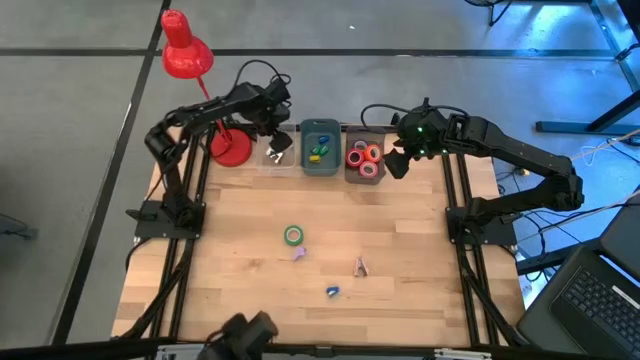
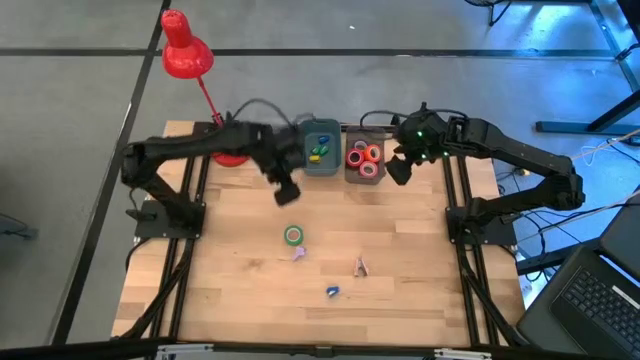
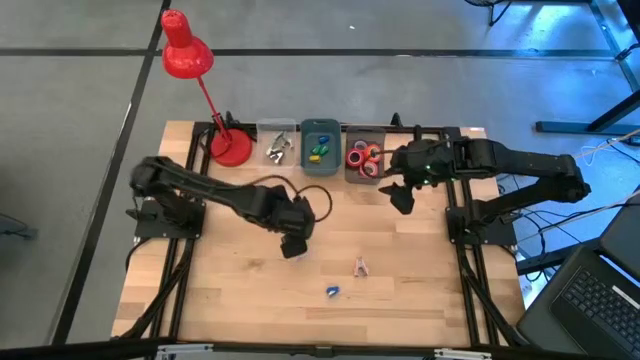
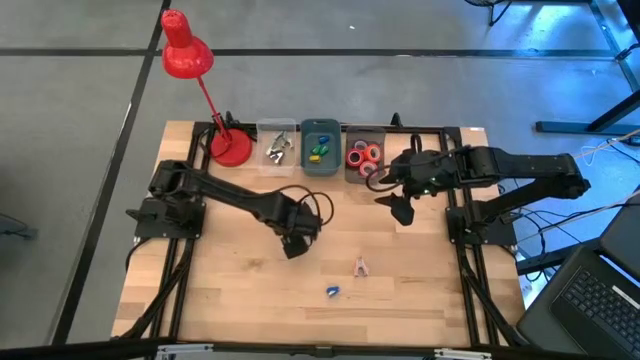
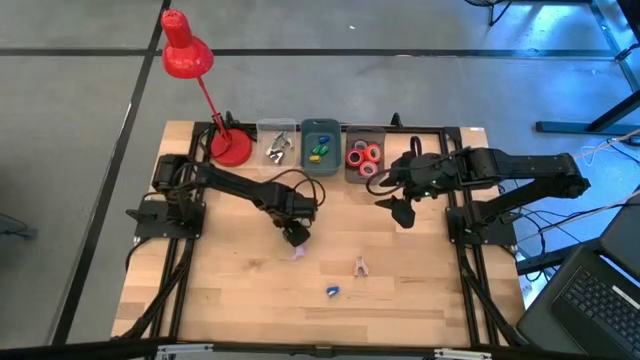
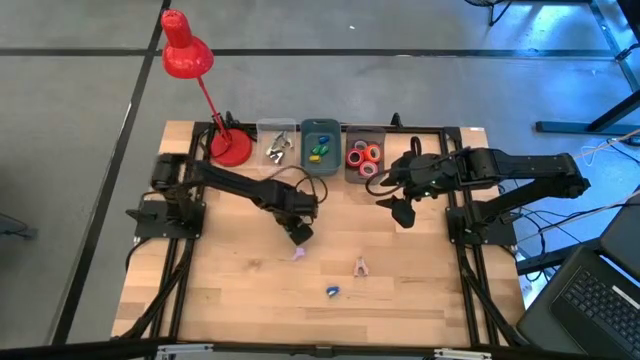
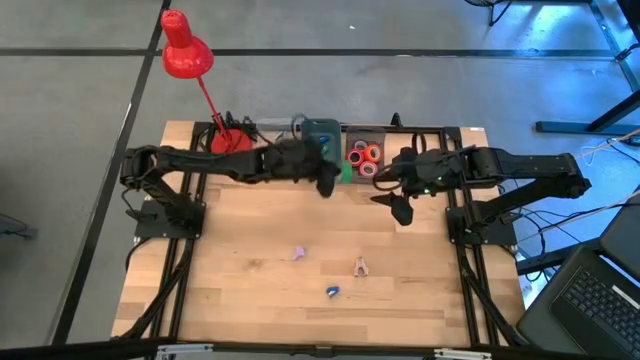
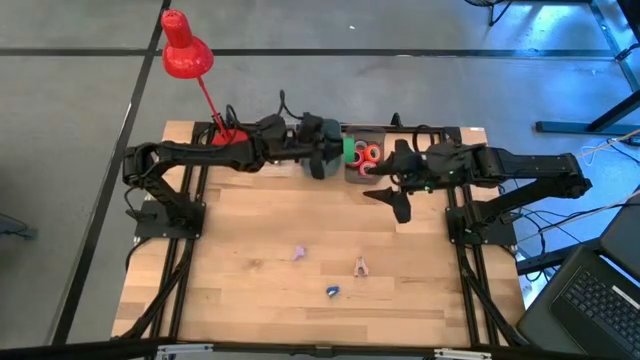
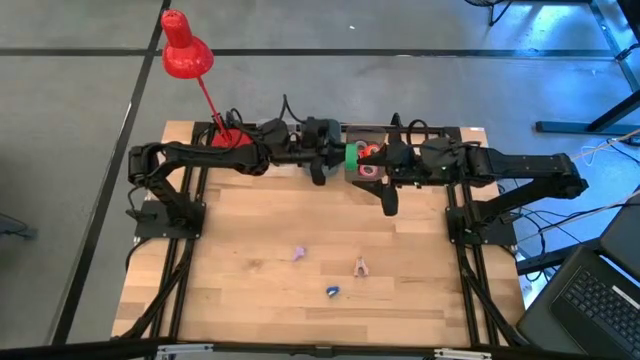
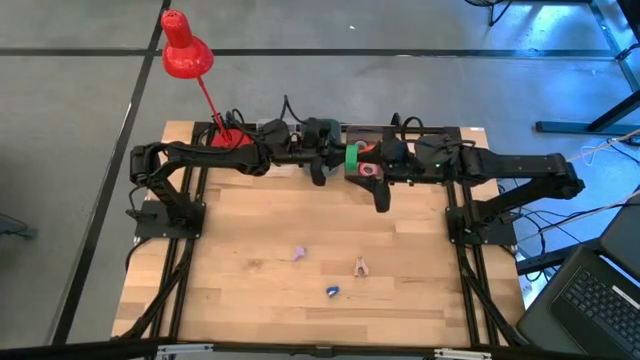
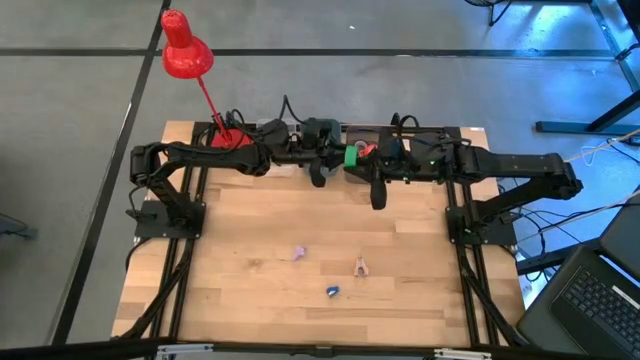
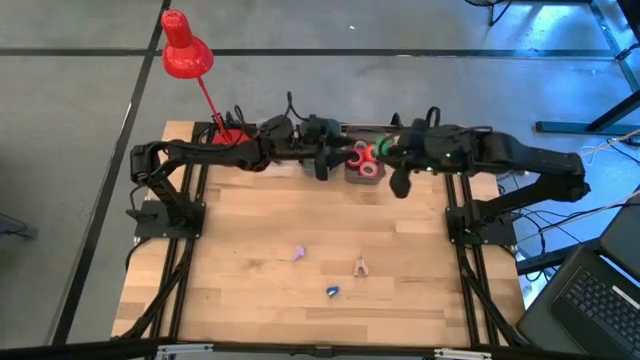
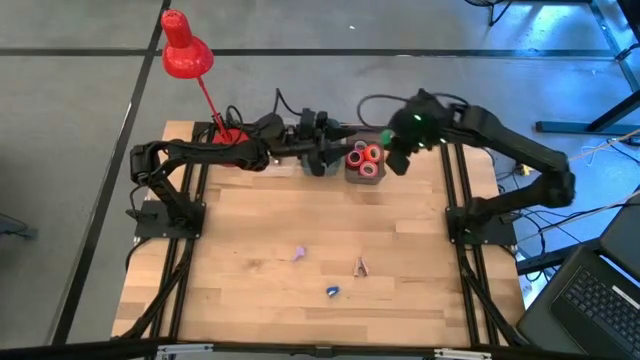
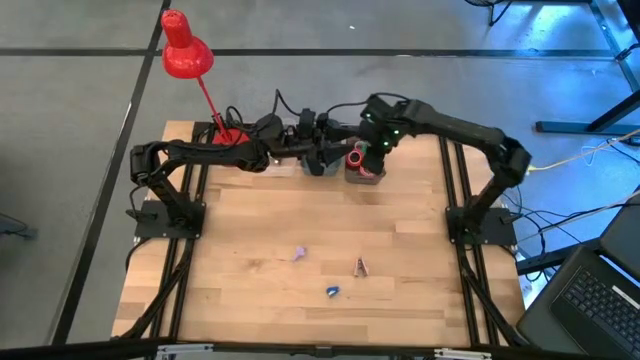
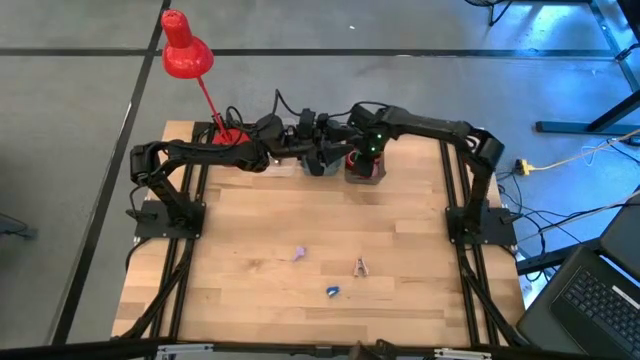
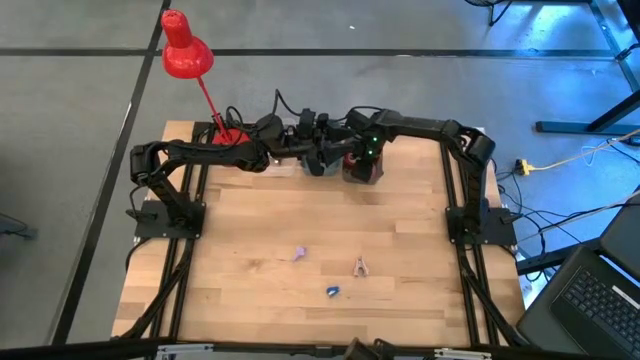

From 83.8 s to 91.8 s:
Task: Pick and place Stapler, Stapler remover, tape
Put the green tape into the black bin

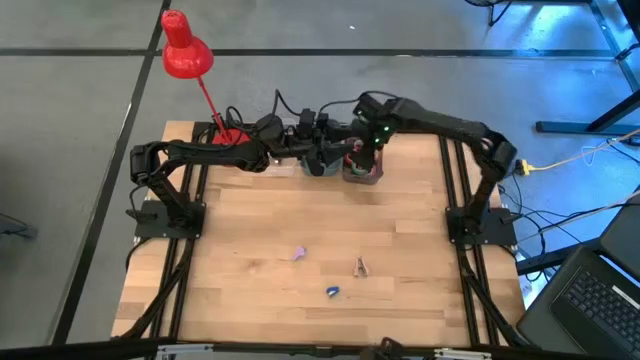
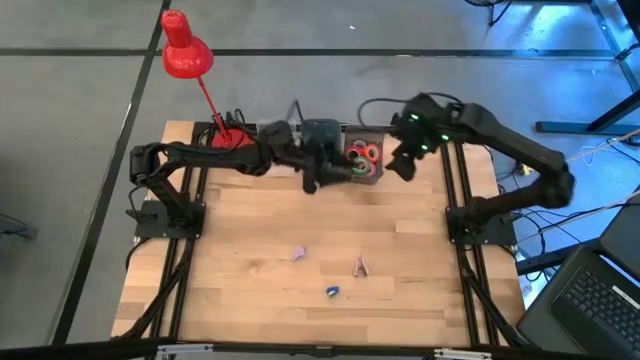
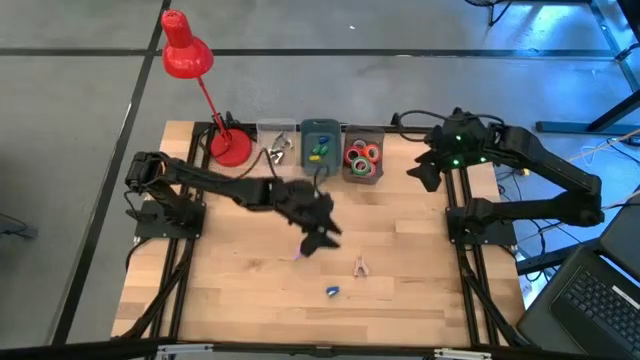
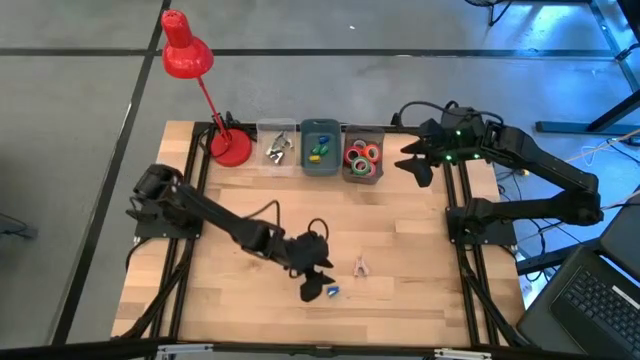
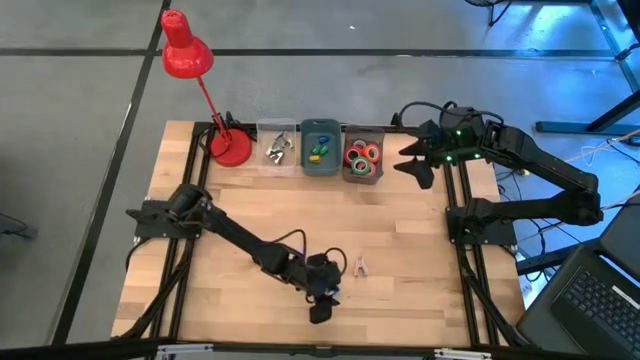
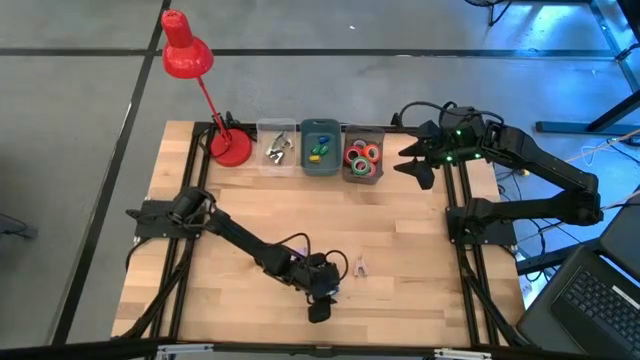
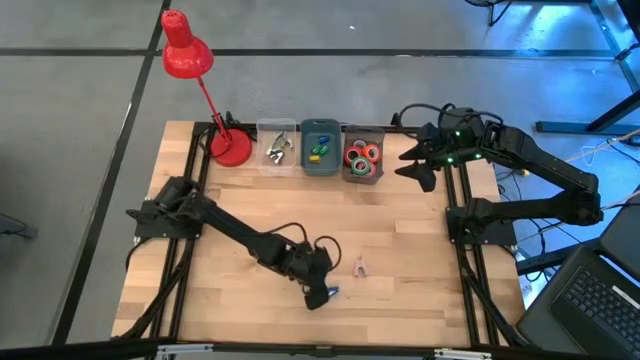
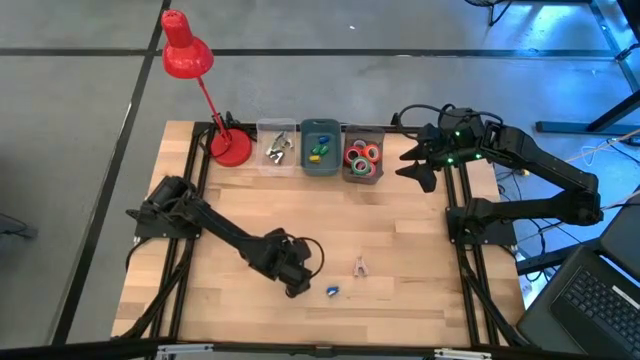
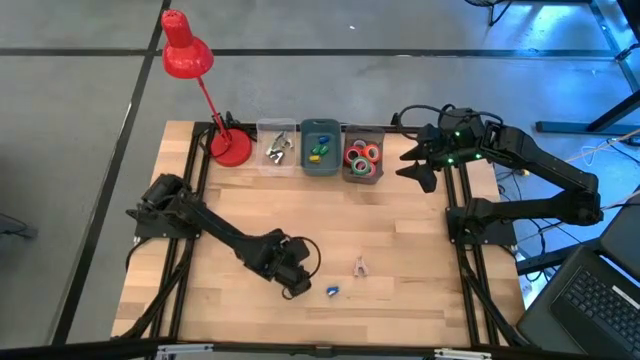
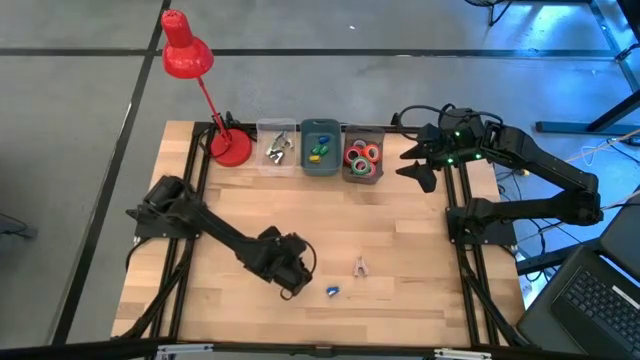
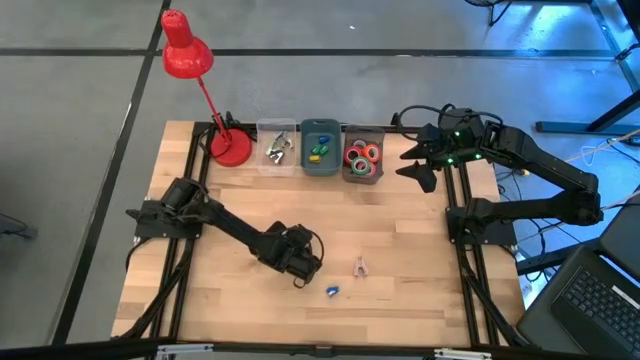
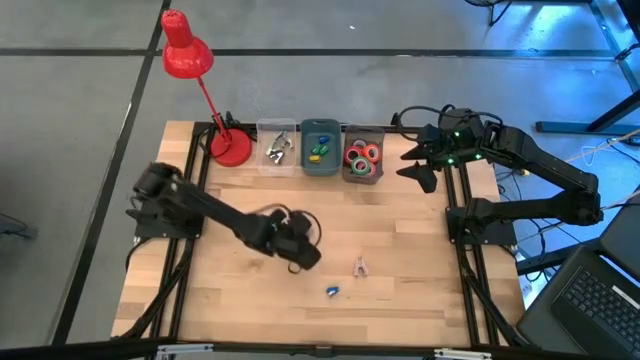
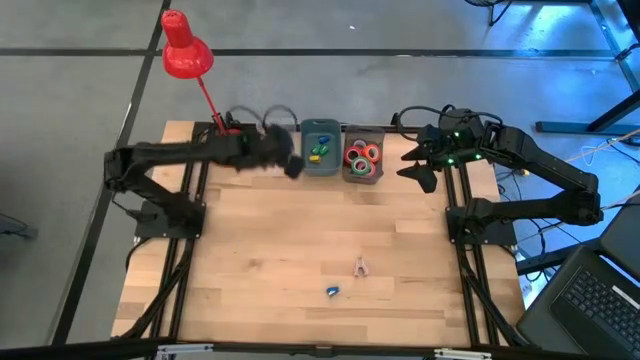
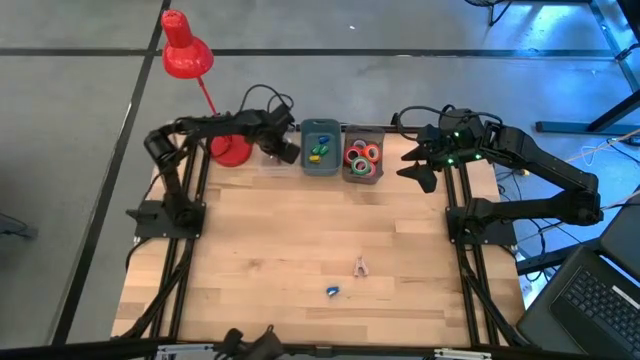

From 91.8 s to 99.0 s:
Put the purple staple remover into the transparent bin

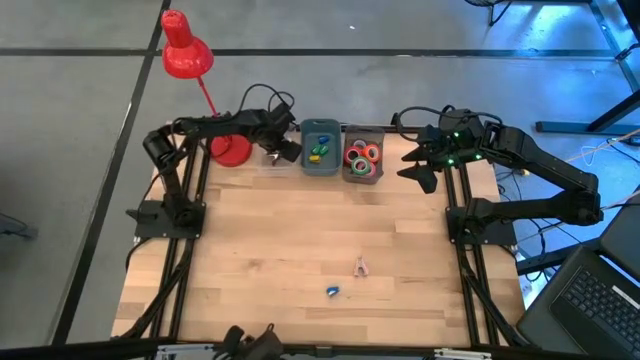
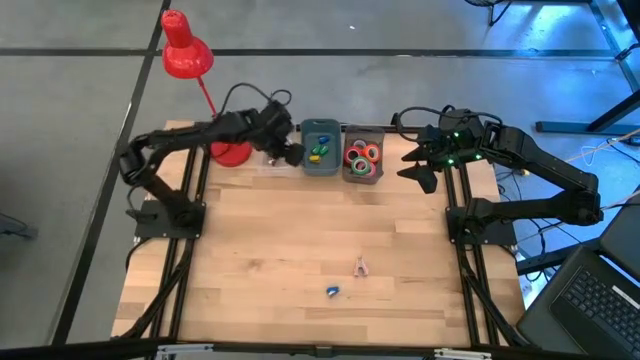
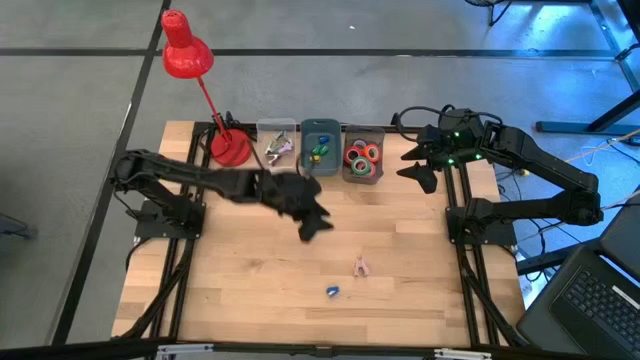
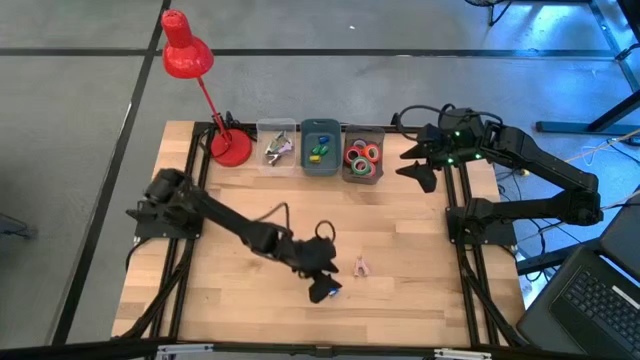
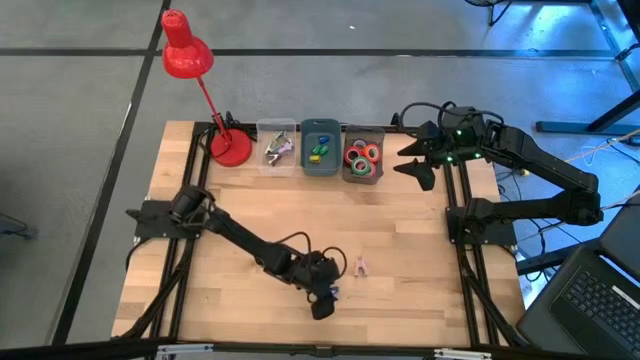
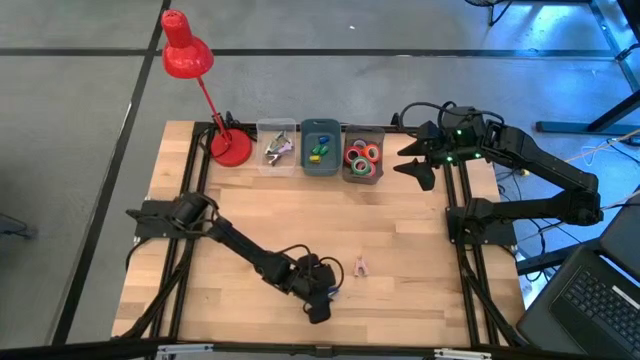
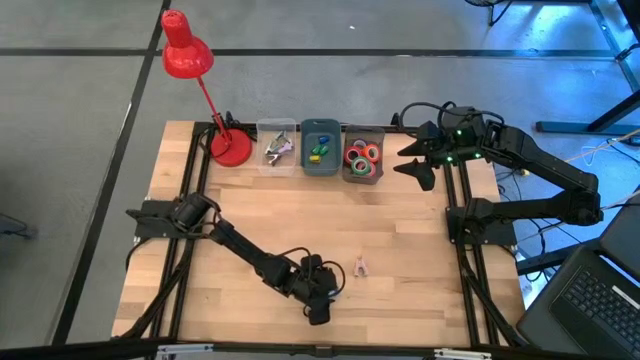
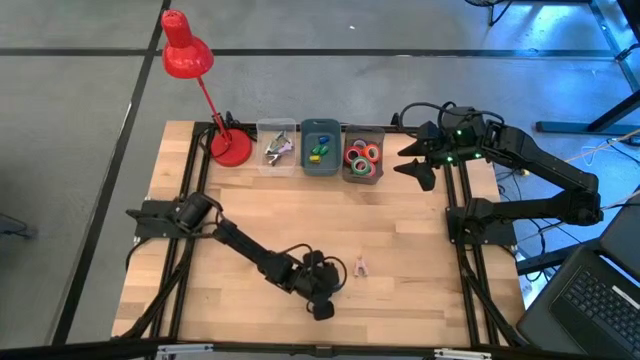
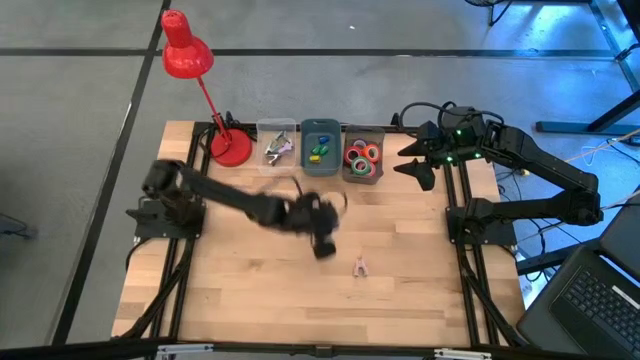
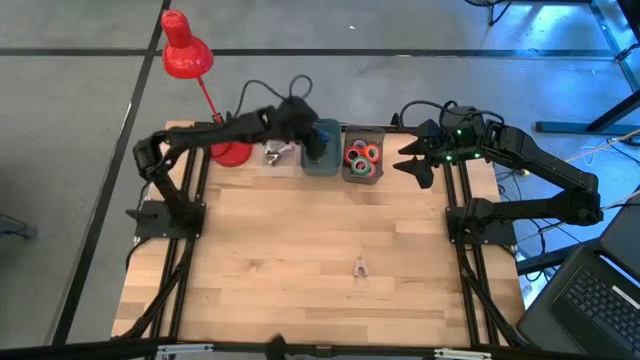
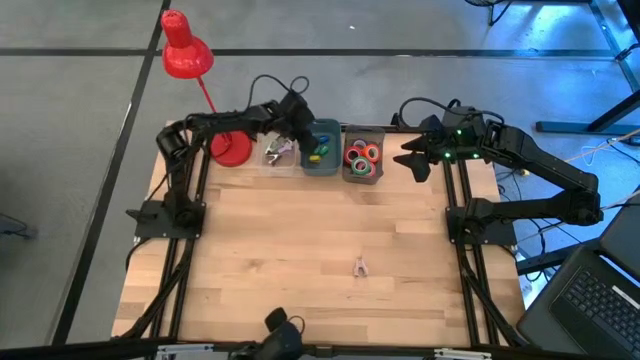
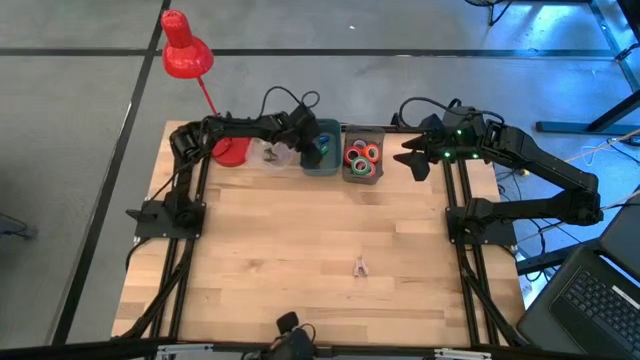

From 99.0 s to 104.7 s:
Put the blue stapler into the blue bin

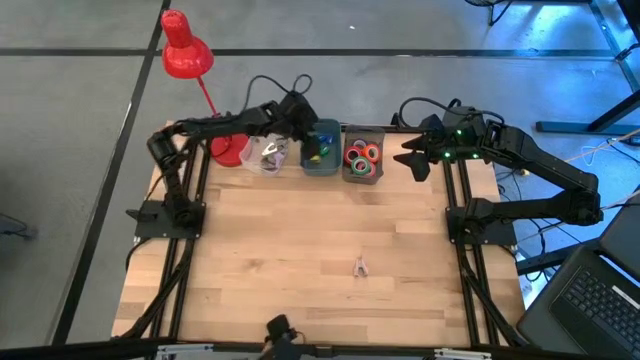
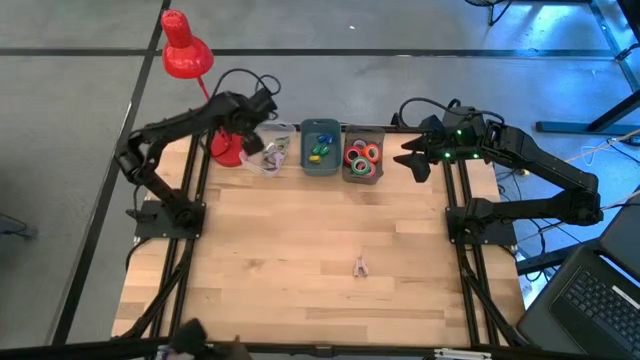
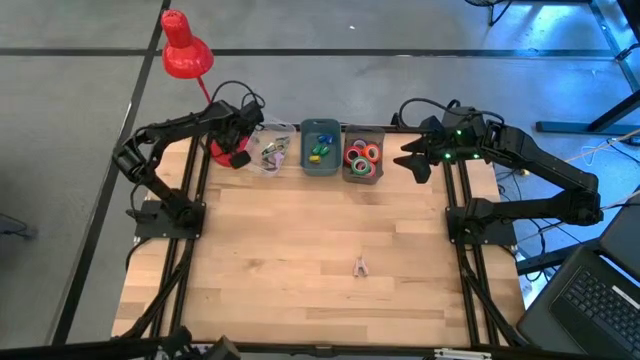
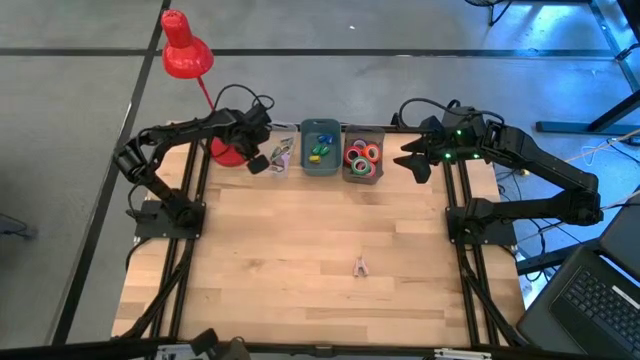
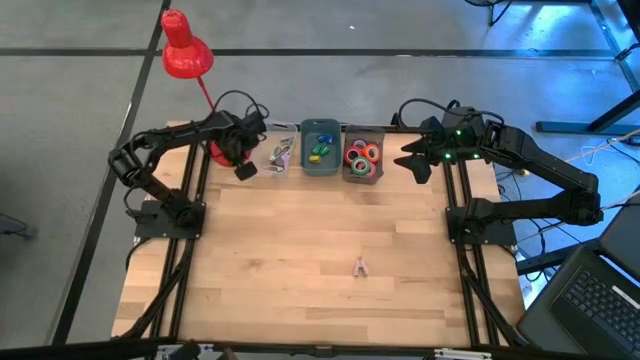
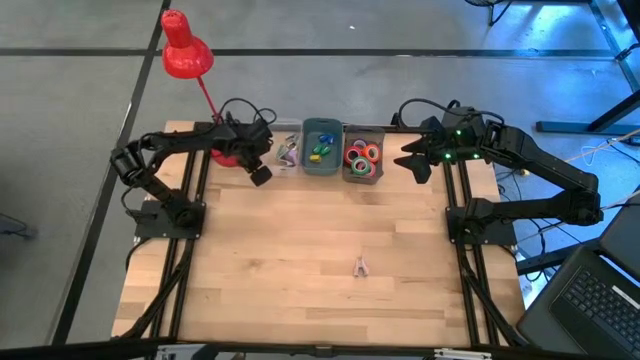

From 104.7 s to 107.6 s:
Adjust the transparent bin on the table
